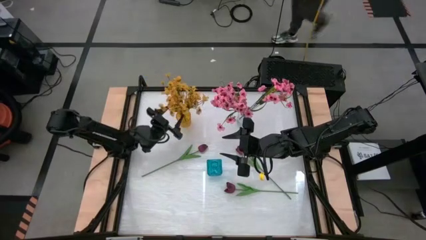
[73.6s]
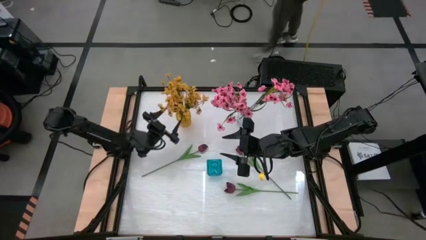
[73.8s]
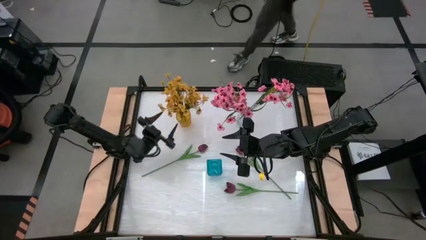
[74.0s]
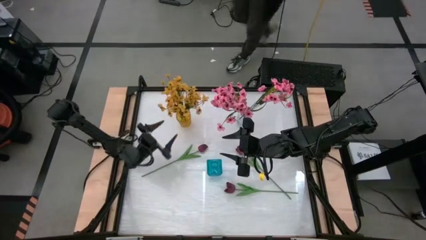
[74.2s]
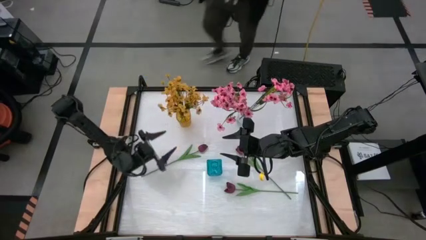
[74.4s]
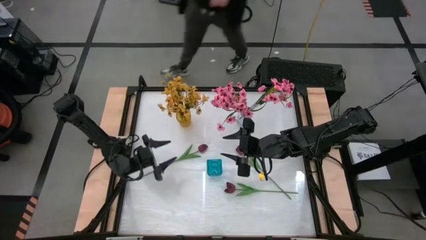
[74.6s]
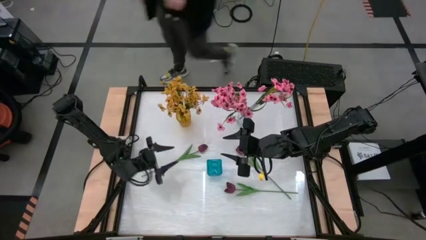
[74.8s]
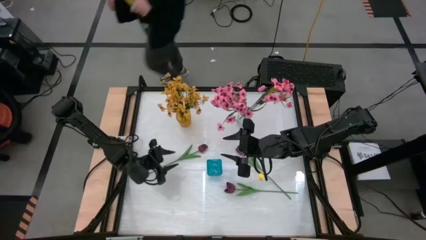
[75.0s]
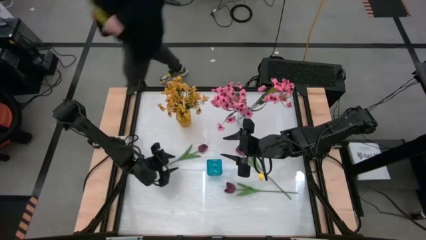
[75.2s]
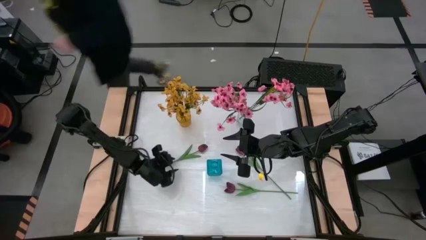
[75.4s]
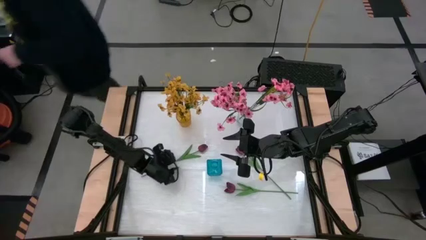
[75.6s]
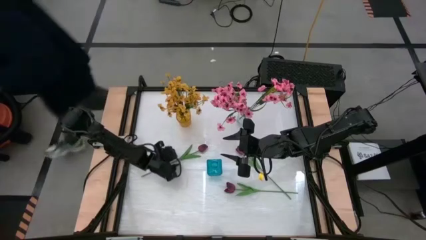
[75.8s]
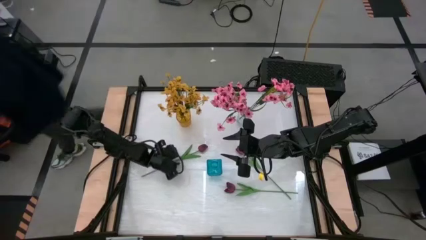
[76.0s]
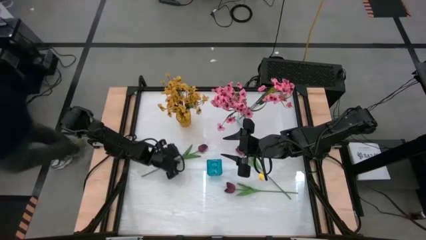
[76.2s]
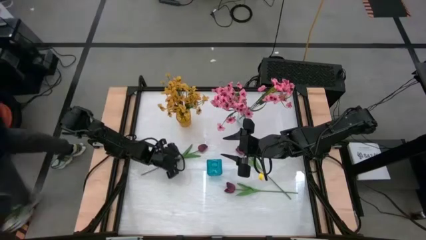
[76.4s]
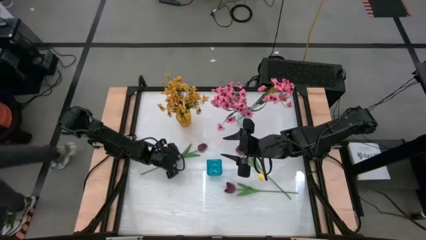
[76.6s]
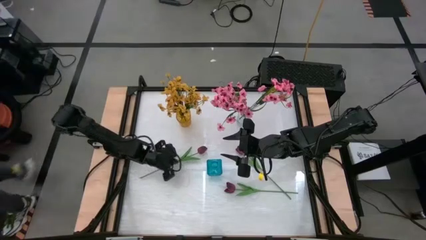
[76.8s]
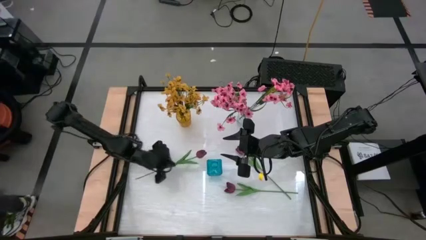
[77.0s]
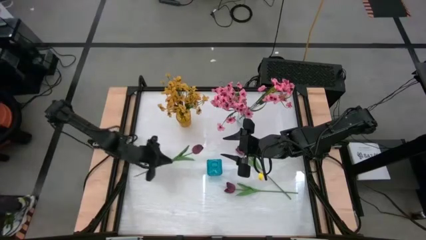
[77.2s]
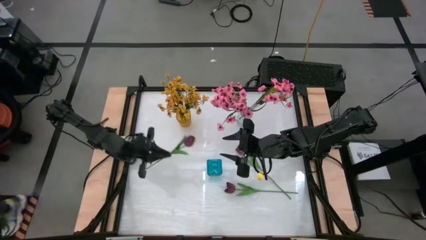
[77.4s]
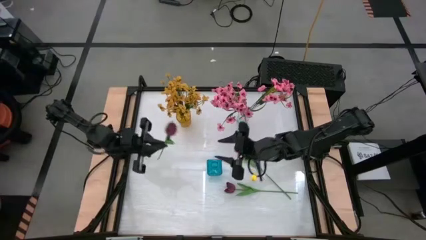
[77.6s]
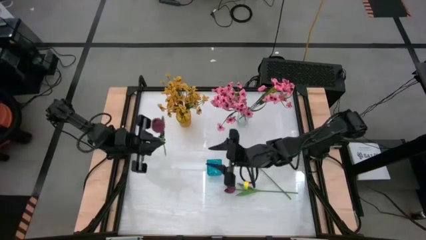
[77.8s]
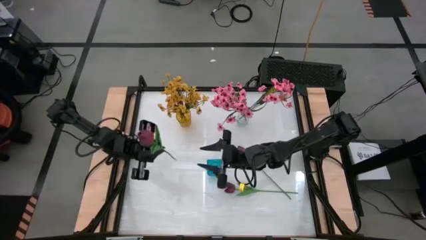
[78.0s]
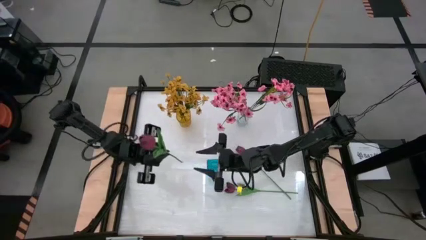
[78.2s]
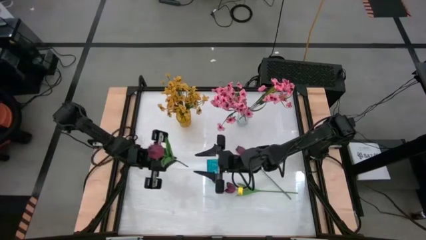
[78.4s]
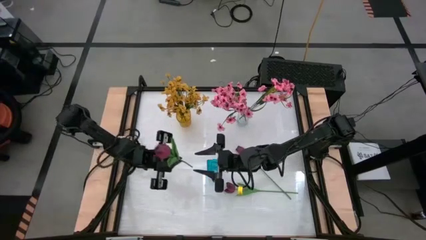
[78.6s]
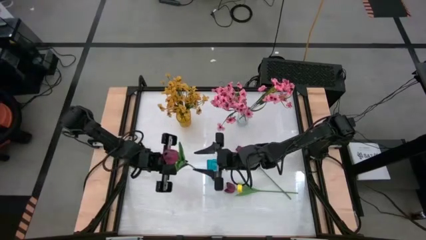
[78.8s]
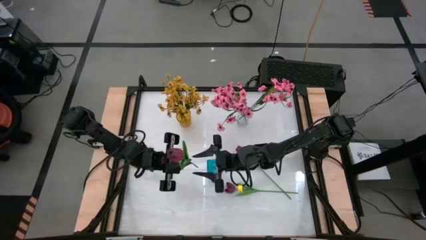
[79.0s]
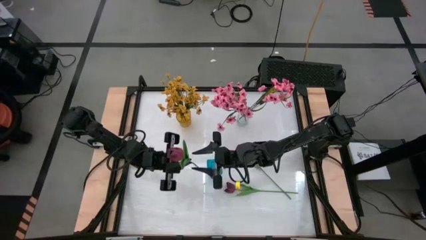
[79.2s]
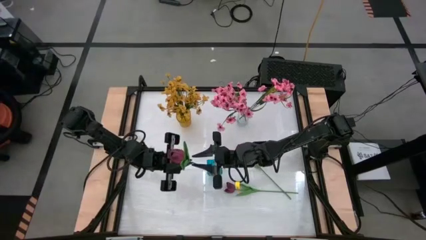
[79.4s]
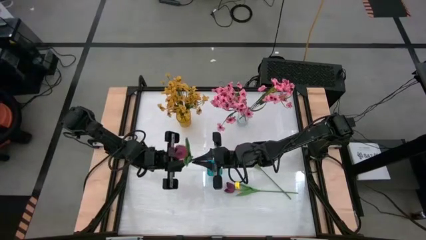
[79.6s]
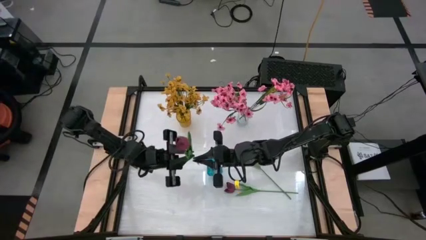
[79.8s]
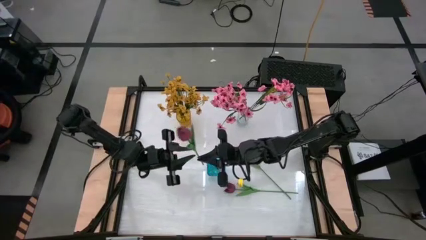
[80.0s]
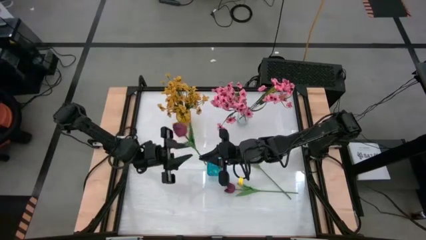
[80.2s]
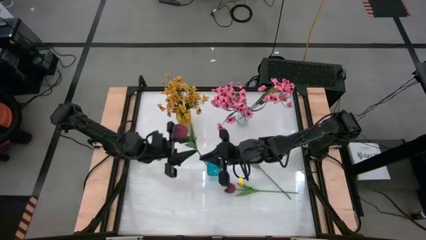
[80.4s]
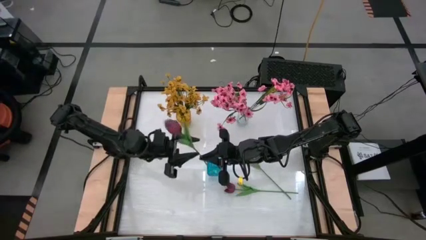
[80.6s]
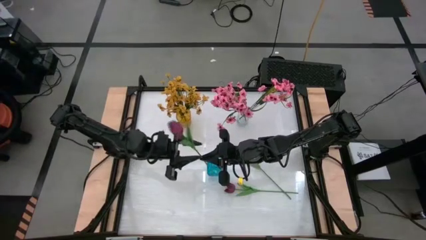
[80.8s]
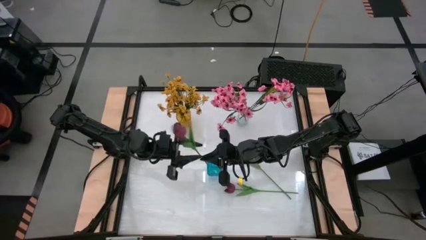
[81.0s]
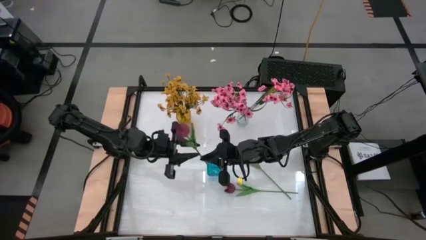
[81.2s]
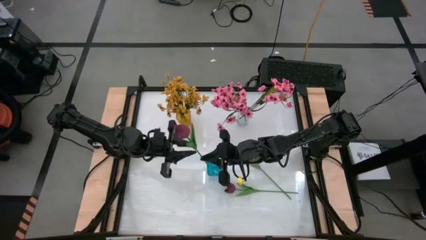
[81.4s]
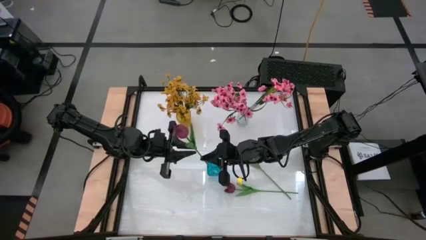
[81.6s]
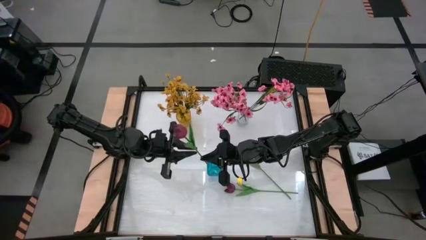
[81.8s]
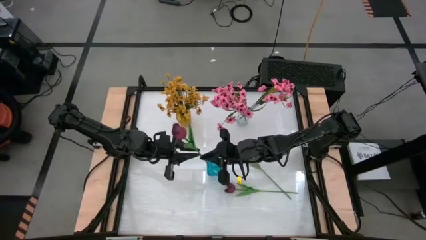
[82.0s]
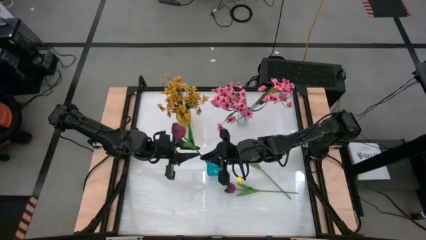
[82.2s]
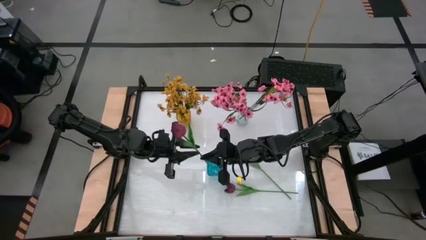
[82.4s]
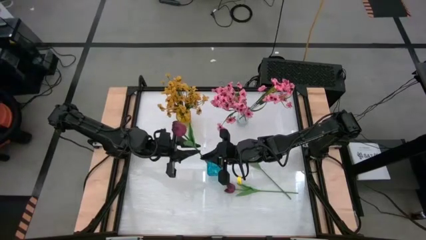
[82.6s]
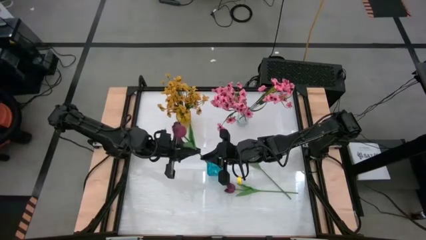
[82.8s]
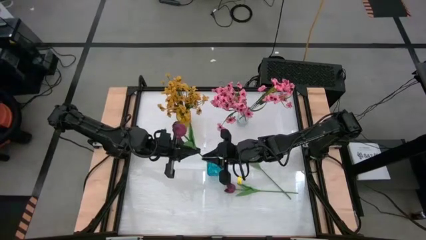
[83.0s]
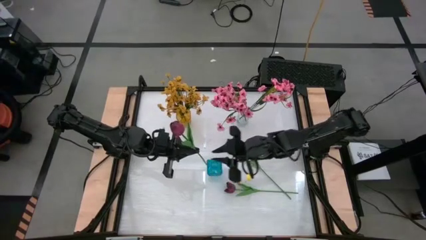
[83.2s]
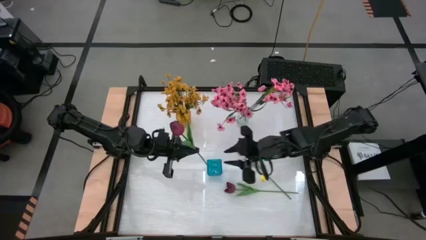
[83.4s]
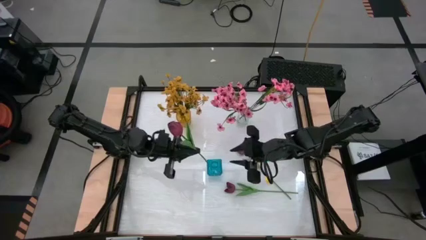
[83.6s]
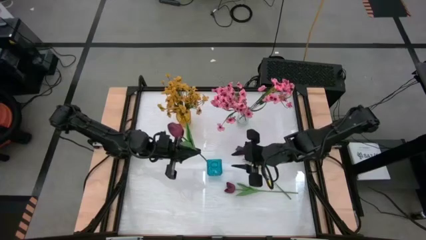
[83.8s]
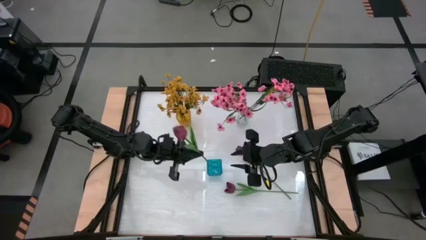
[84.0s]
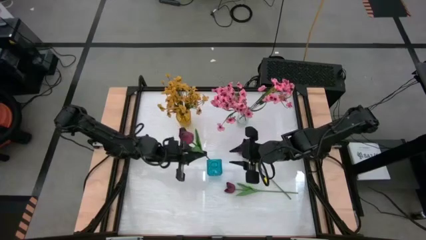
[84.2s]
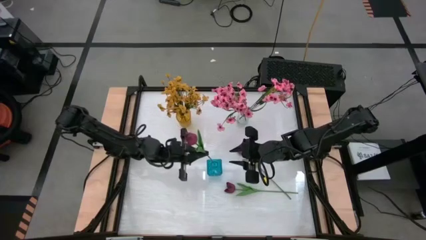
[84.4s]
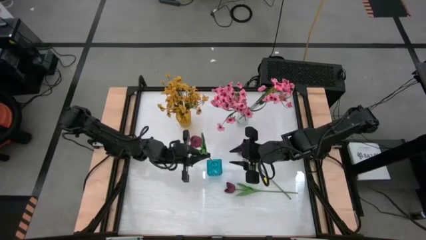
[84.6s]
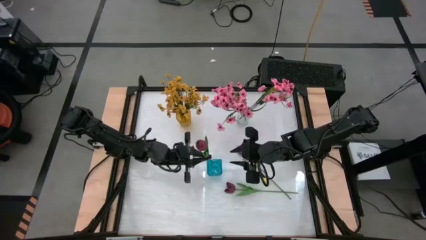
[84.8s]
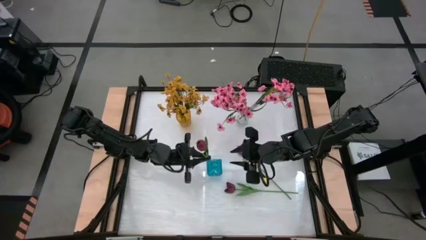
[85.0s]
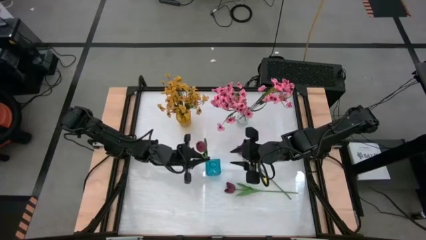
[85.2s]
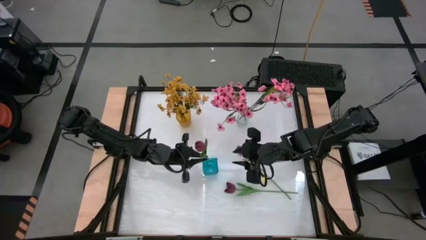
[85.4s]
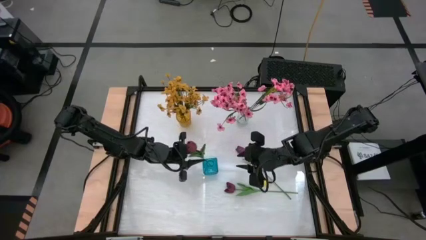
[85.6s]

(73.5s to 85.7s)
Task: Sort flowers into vase by color
Put the top left dark red flower into the blue vase

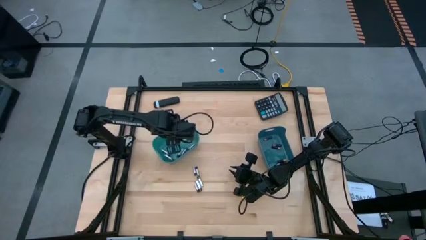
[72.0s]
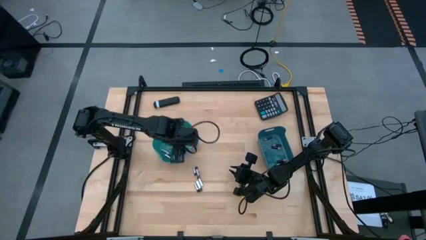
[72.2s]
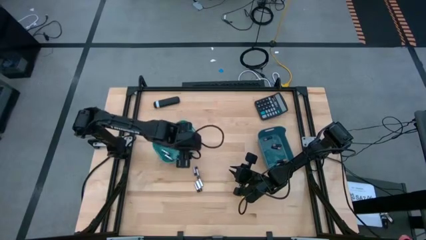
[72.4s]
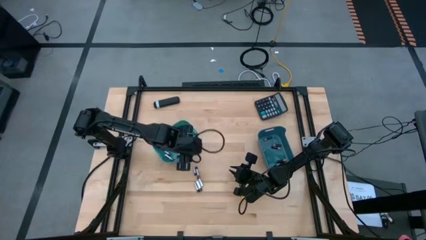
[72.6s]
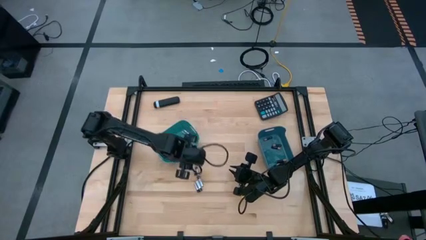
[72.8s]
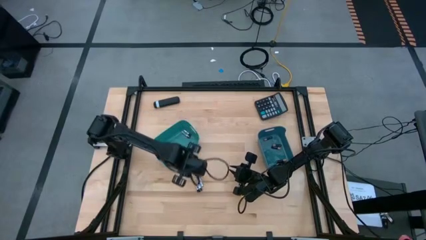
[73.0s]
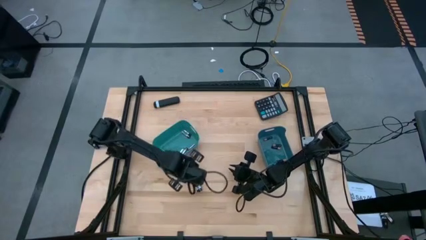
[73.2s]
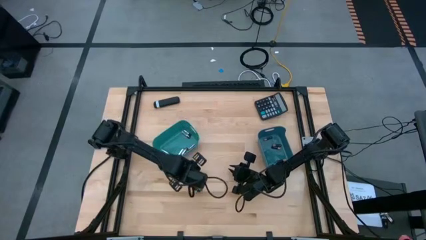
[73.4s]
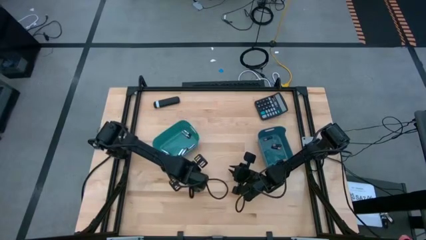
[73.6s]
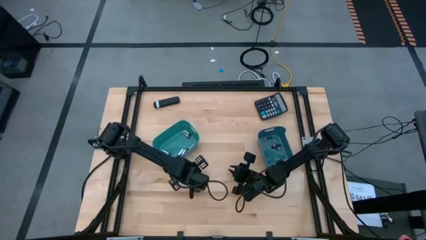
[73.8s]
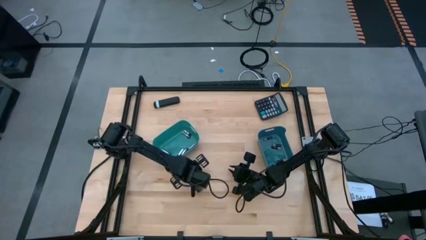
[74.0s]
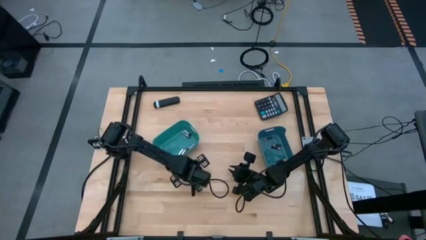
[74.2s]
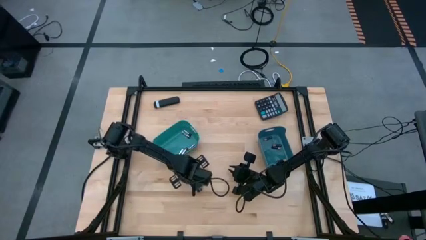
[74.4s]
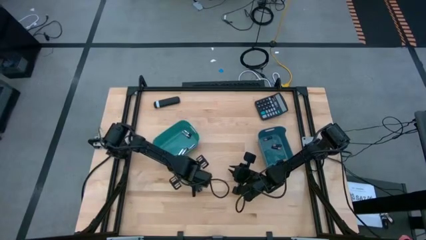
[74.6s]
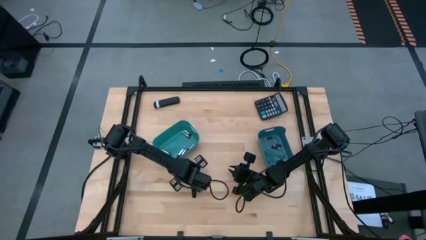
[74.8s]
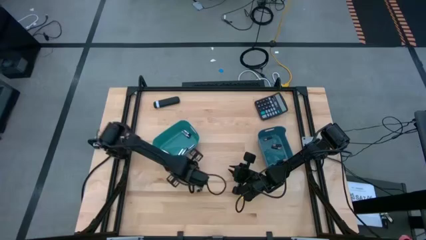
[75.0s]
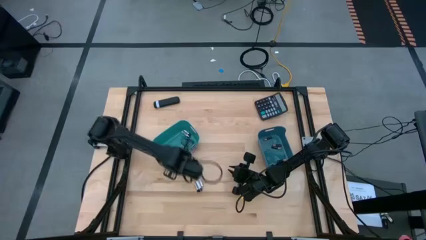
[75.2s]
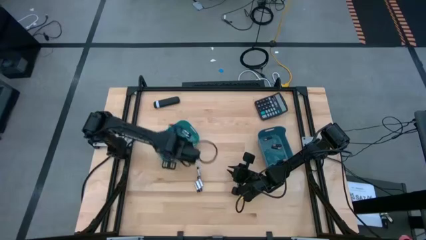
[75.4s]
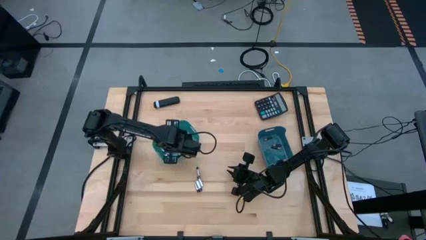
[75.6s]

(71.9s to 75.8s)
Task: Sort batteries
Put the white battery into the green bin
